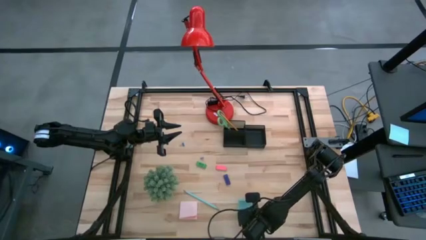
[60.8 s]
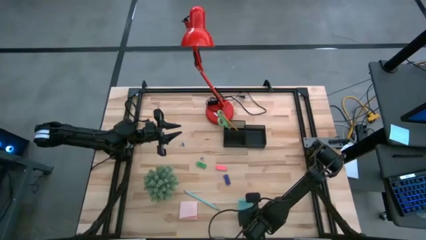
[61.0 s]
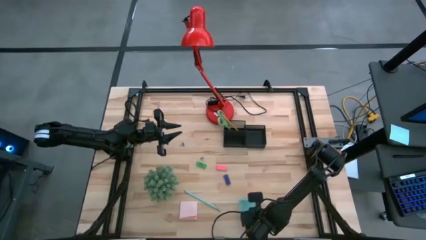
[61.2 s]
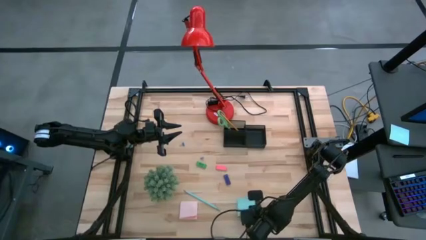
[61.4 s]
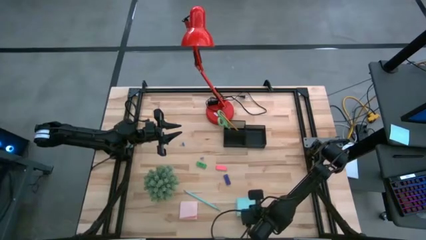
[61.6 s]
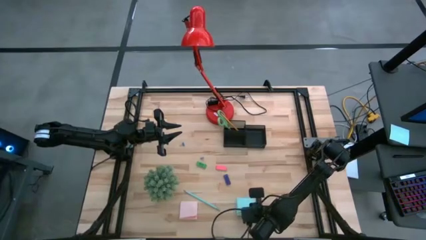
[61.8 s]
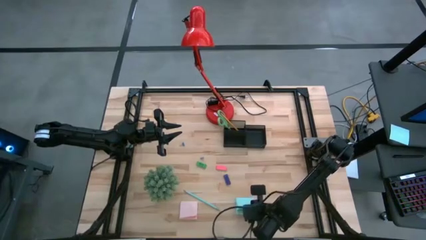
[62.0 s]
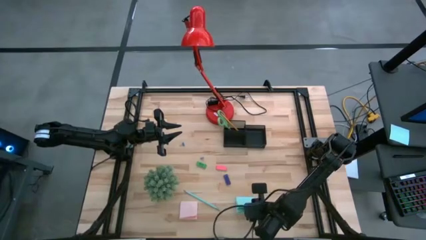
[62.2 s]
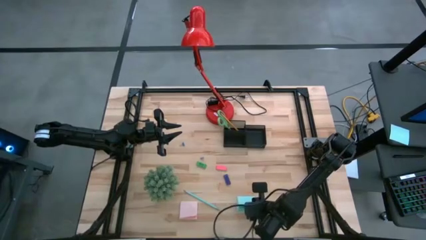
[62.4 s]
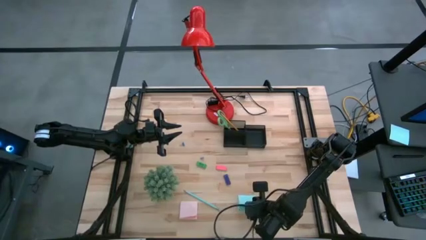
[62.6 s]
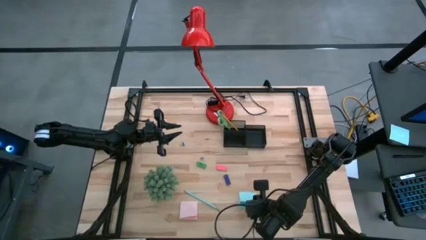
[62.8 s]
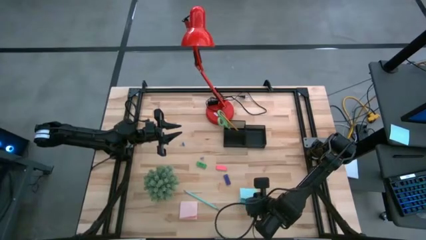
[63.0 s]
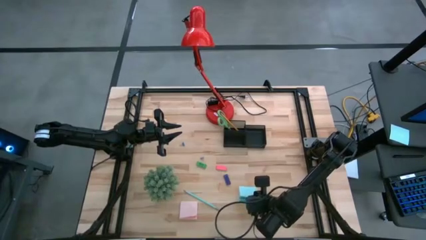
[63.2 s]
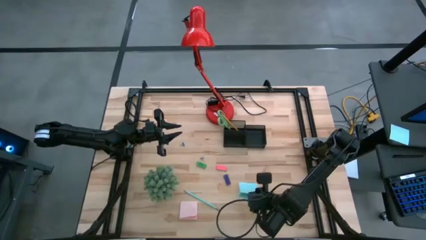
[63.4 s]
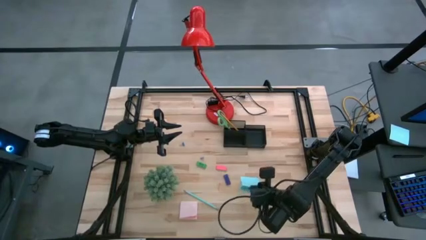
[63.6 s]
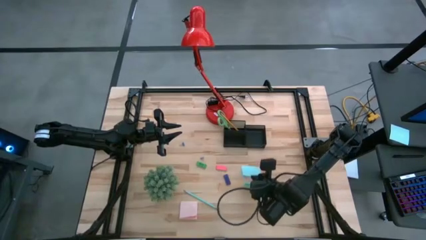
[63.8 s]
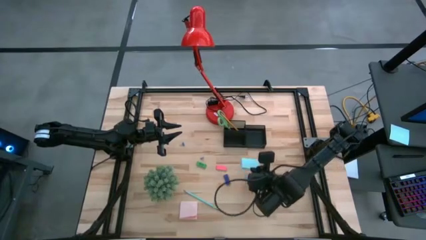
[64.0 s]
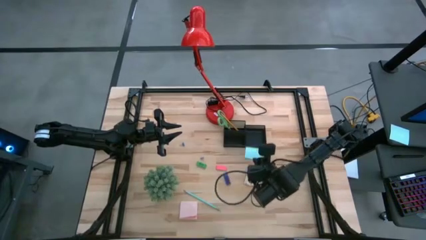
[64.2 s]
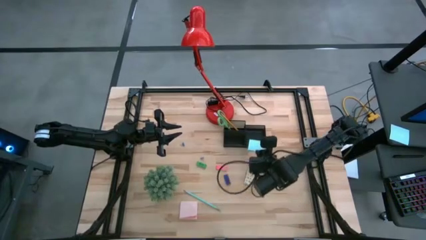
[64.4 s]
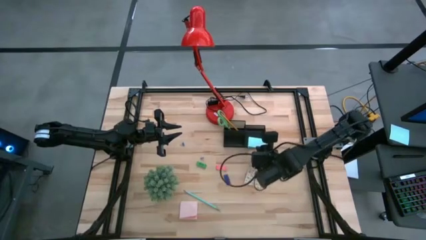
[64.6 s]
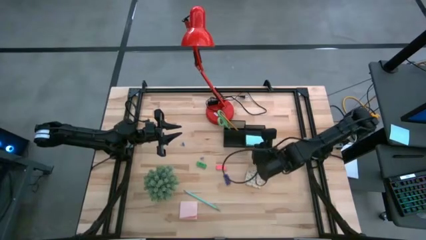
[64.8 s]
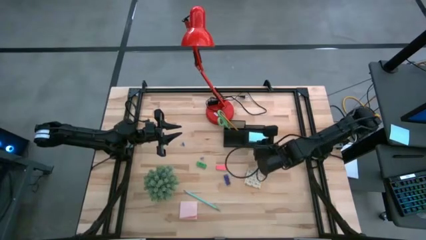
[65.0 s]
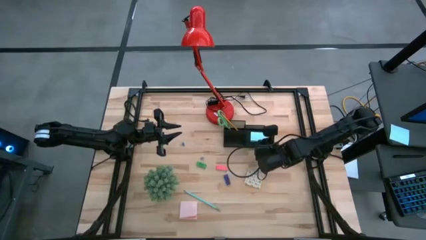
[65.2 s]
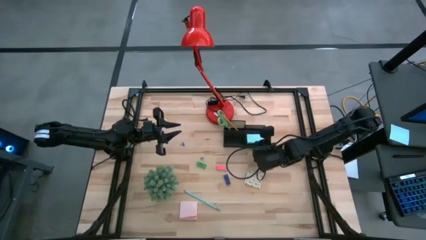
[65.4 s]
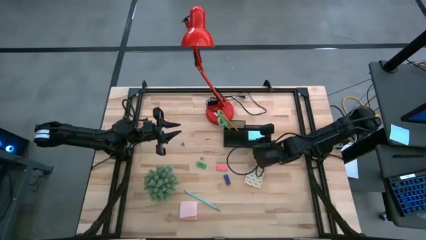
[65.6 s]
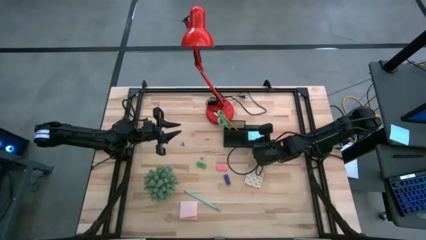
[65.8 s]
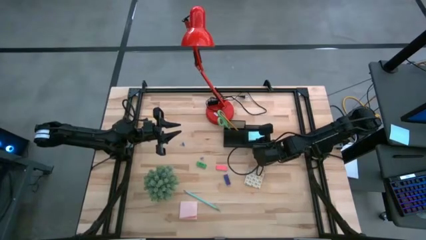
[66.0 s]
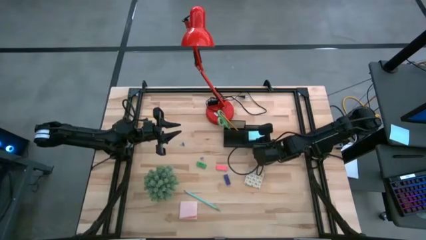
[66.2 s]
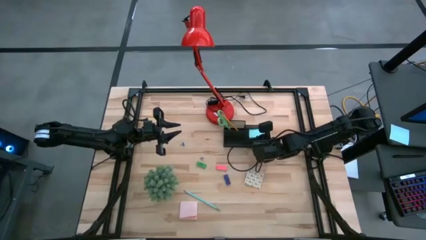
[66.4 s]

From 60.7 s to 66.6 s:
Task: Pick and place office supplies into organizer
Put the top blue sticky note into the right compartment of the desk organizer

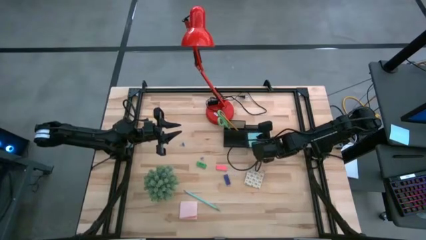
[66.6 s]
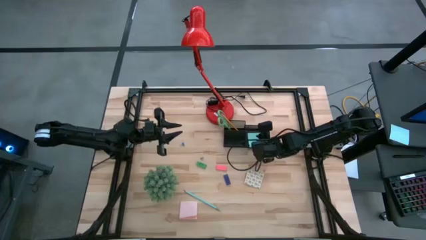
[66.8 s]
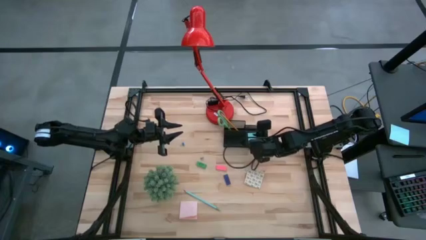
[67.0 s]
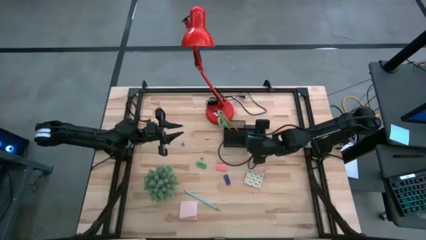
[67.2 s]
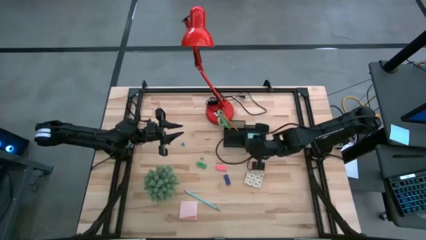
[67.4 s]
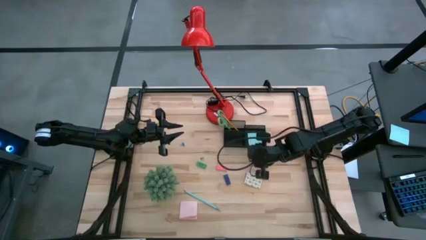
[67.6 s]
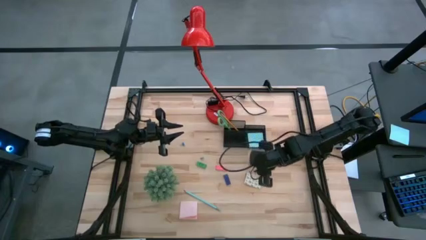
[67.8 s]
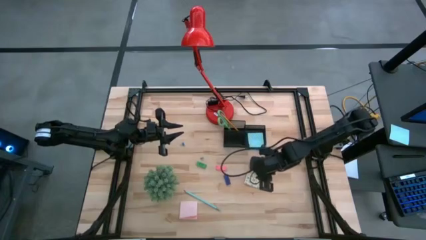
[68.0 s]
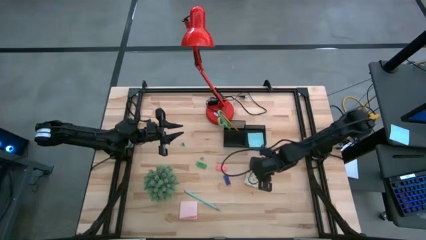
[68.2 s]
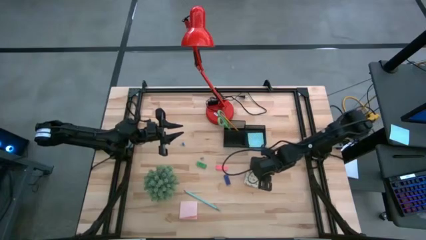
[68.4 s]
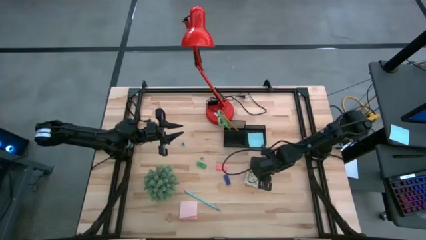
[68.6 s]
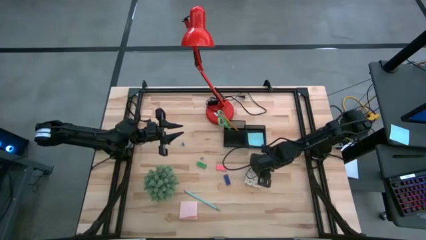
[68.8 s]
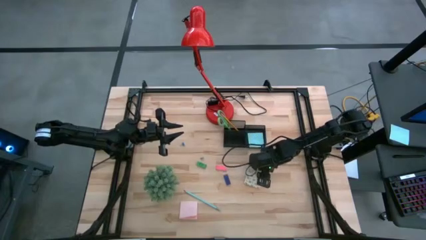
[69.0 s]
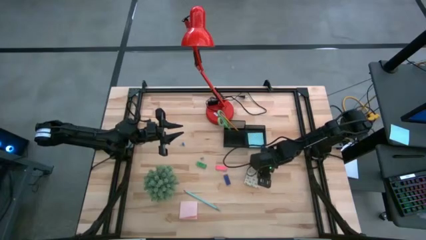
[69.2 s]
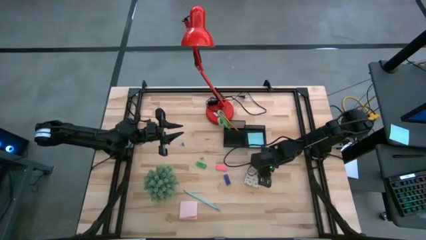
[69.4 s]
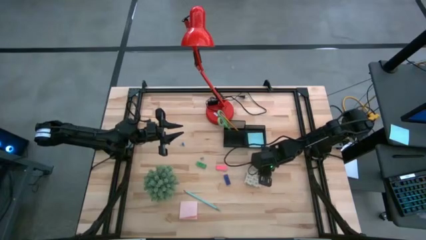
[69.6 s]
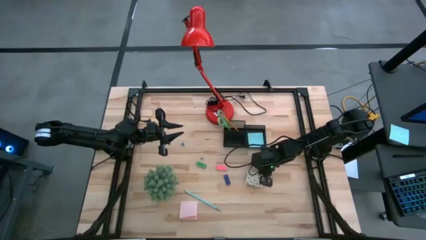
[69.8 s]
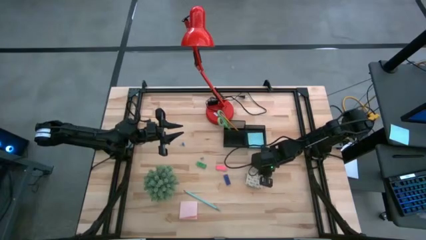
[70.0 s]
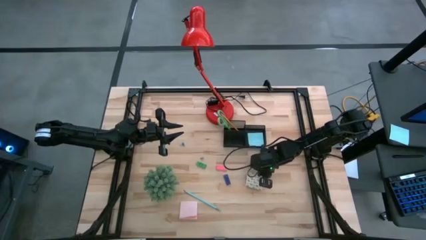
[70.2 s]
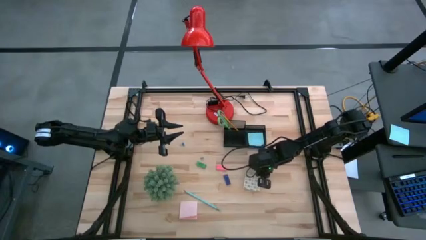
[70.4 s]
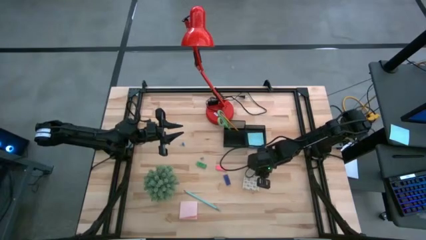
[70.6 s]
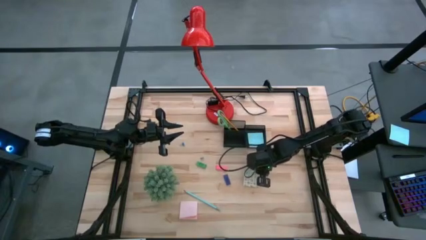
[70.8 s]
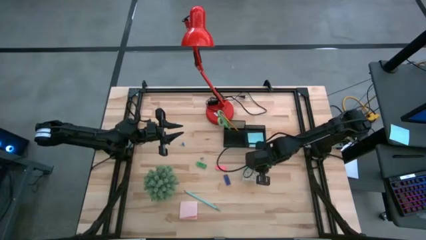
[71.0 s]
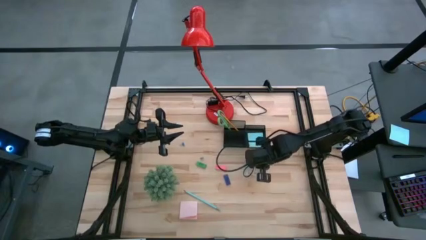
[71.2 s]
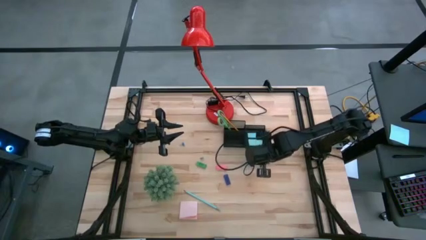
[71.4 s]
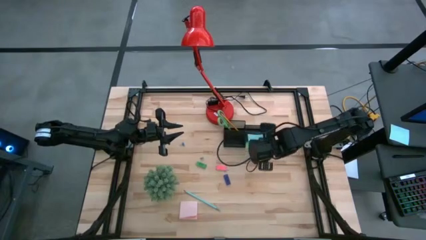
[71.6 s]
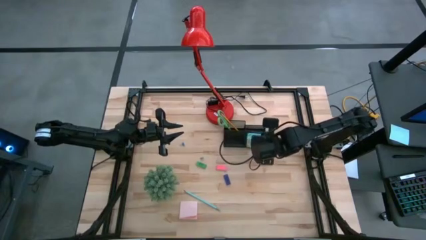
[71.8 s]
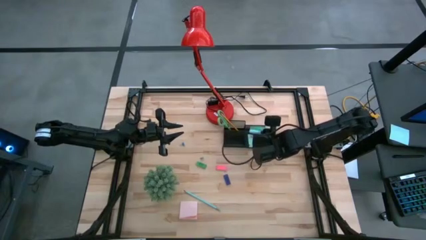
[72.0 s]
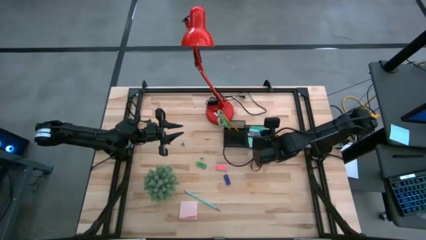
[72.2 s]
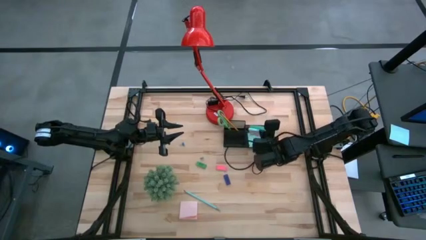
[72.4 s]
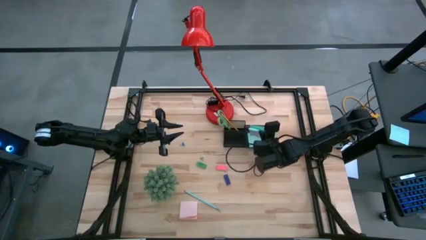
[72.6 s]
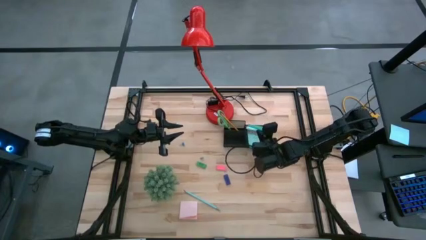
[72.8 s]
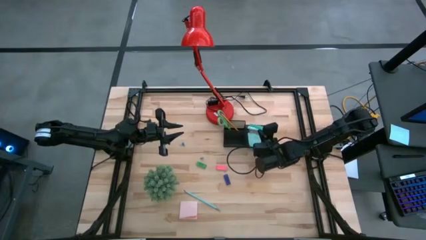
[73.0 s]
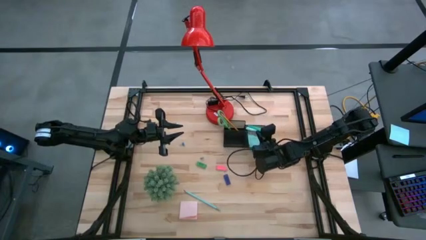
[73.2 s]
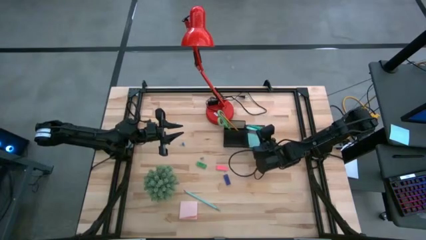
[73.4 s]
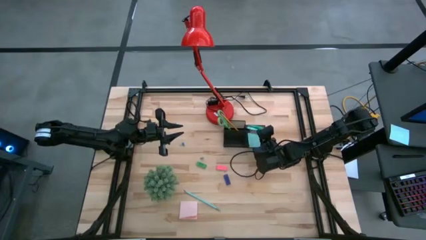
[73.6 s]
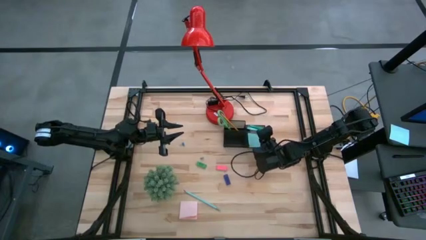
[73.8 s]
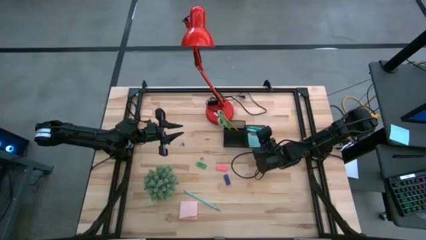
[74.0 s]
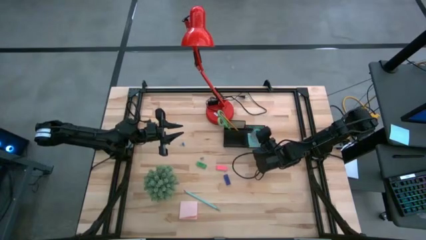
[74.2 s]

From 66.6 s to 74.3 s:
Put the blue sticky note into the right compartment of the desk organizer
